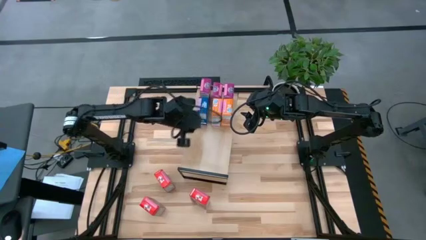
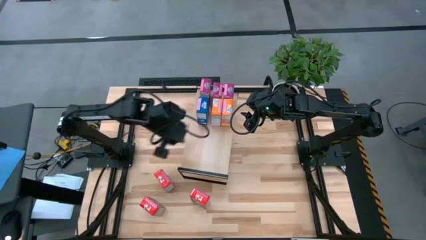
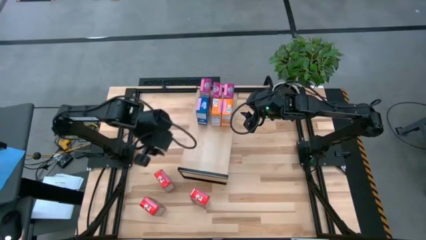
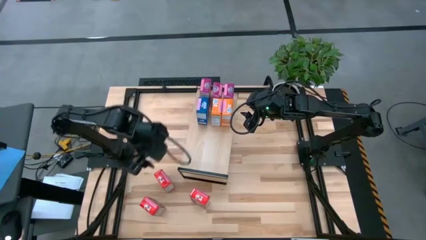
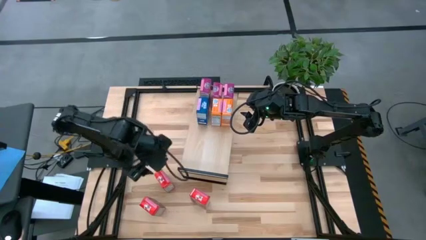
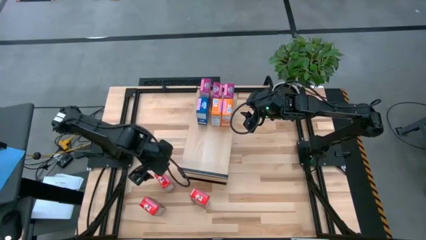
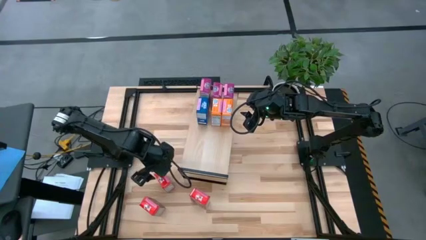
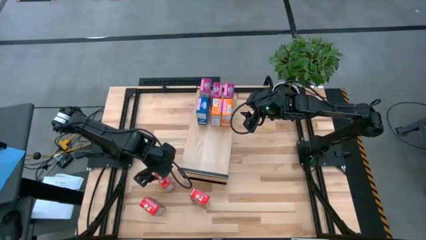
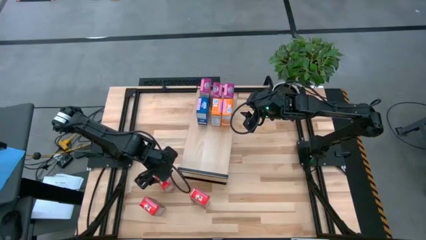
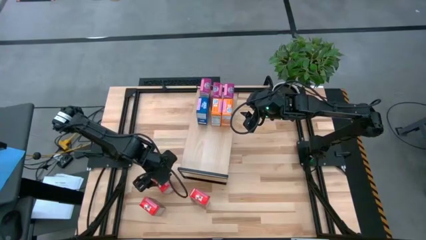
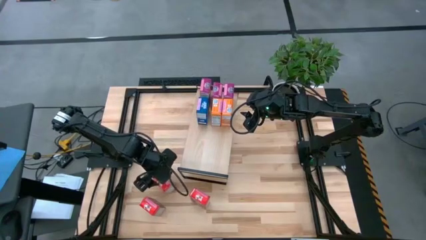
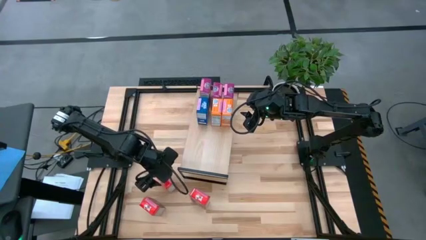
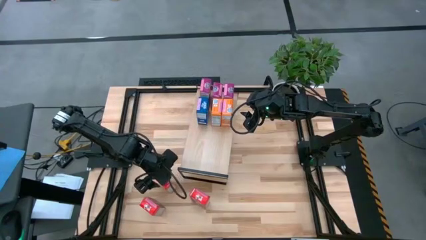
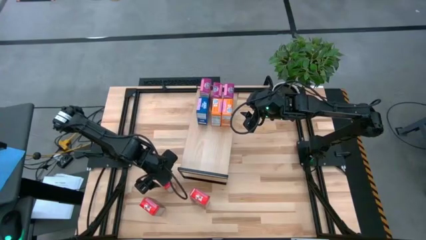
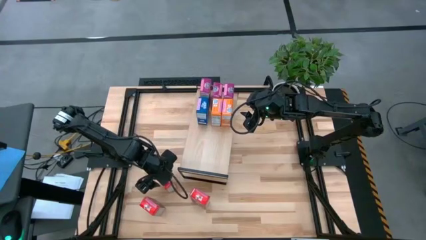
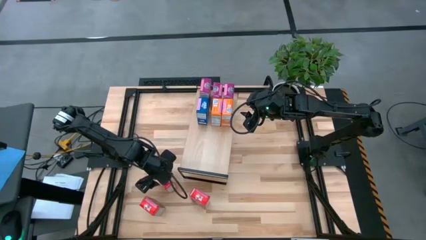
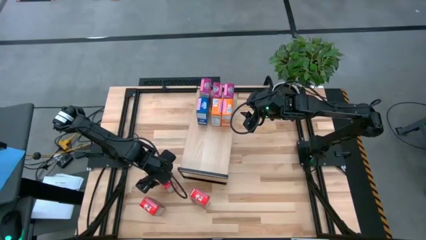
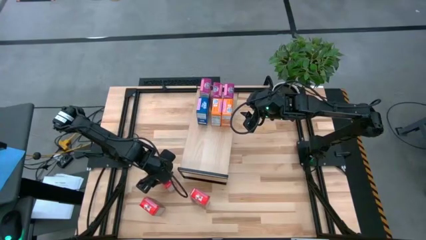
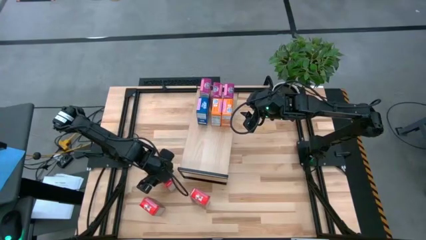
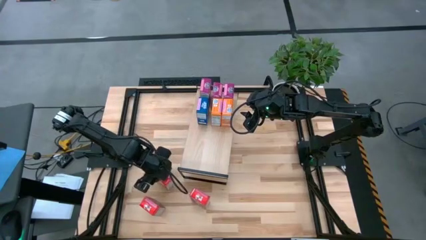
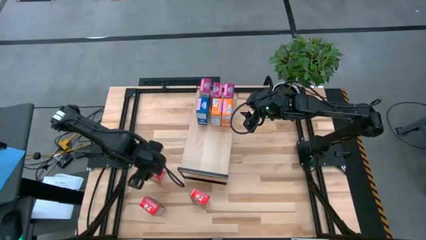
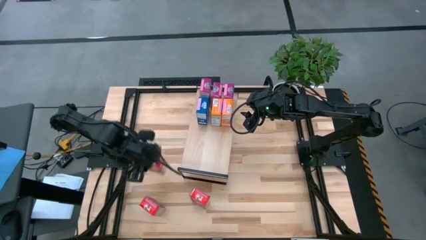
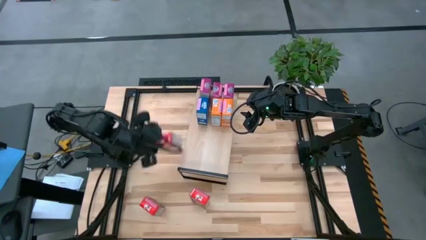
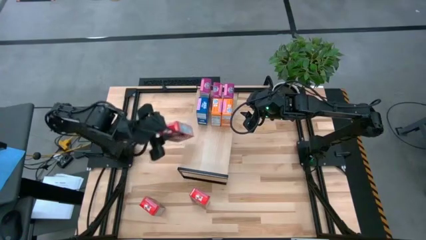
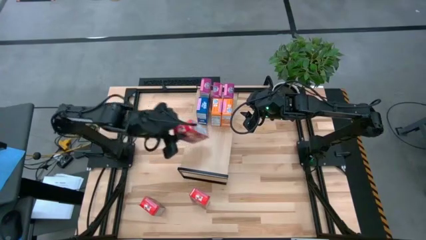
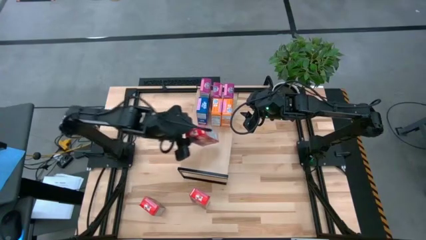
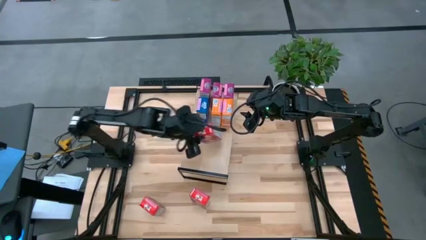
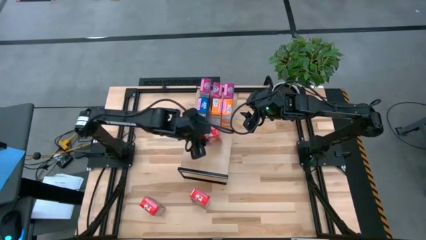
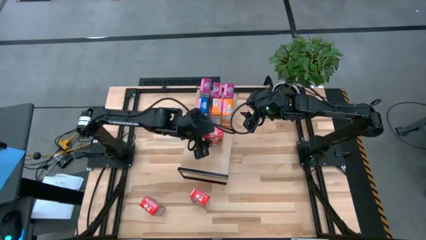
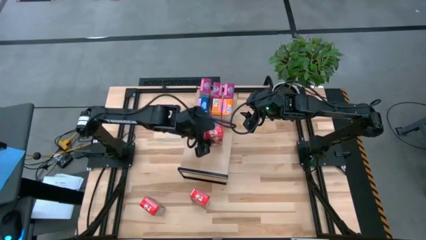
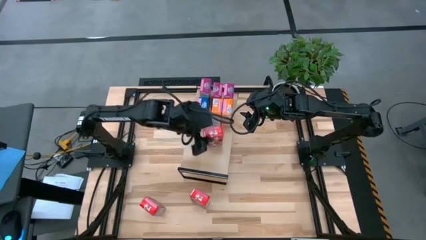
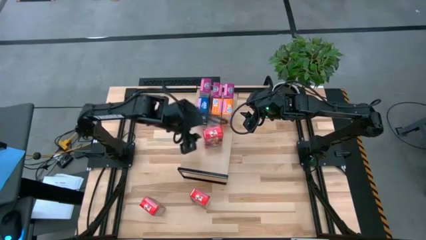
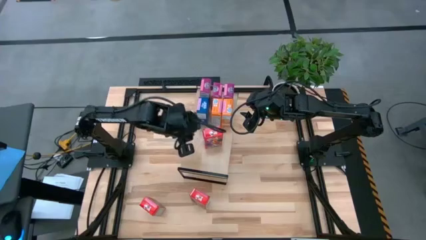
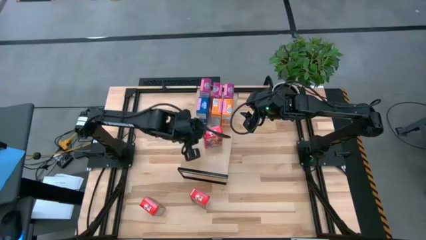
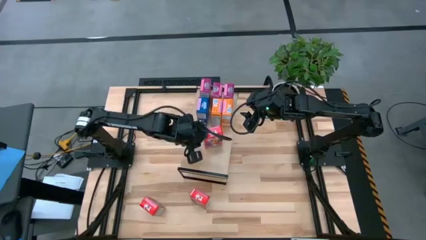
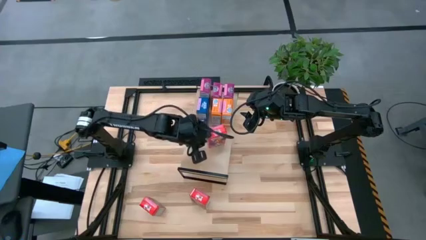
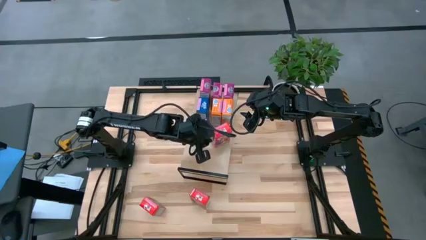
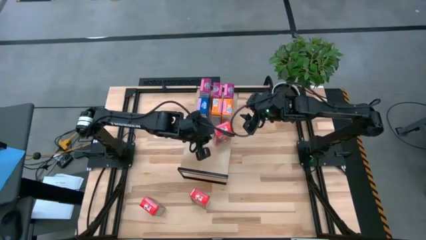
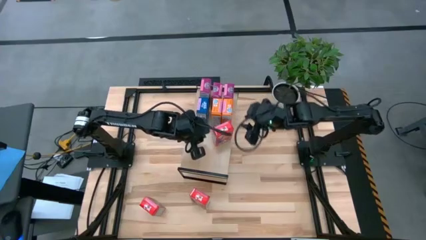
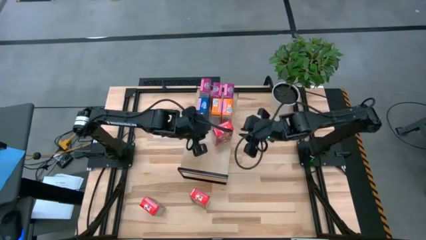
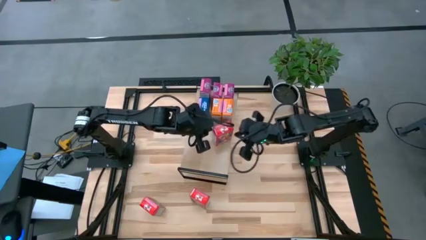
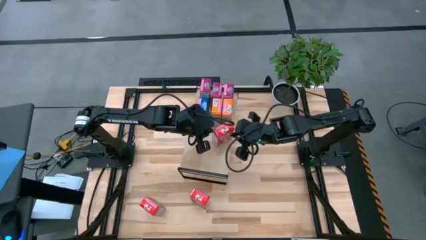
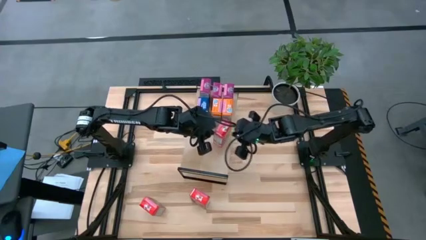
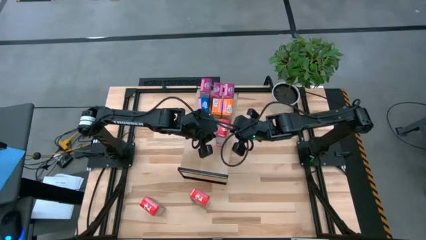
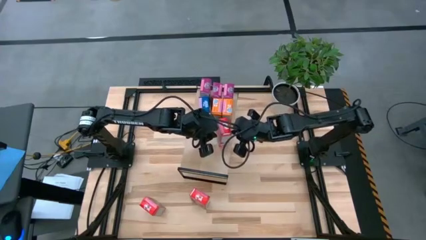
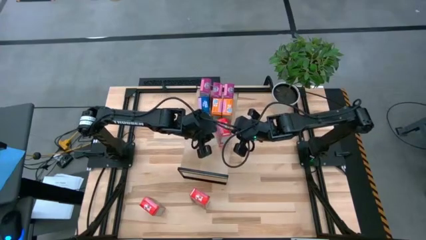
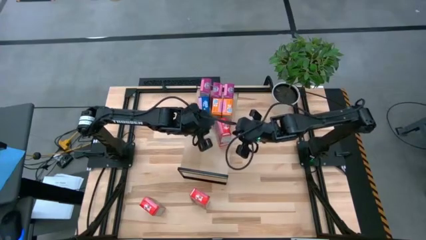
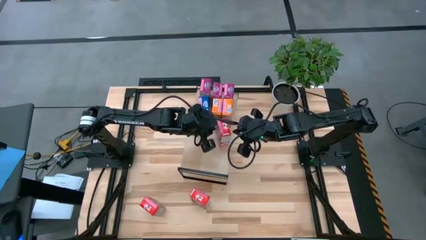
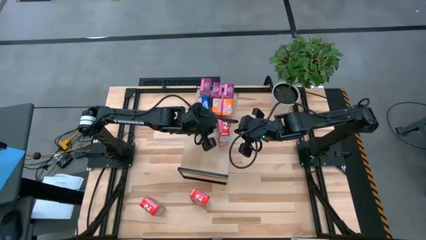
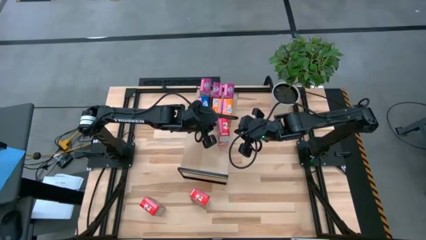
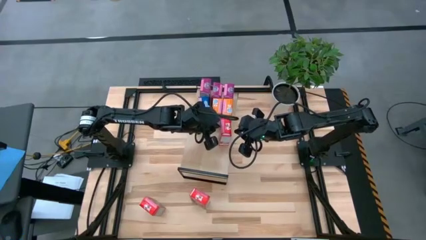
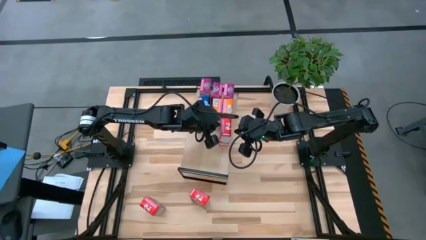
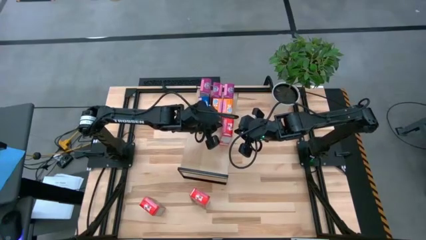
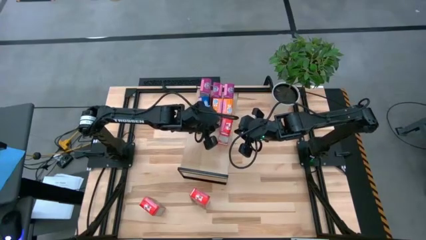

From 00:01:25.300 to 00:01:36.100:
Task: Stack cereal on shelf
Put the top red cereal box into the shelf
